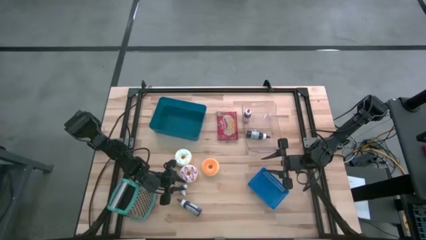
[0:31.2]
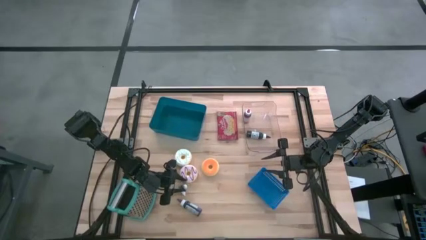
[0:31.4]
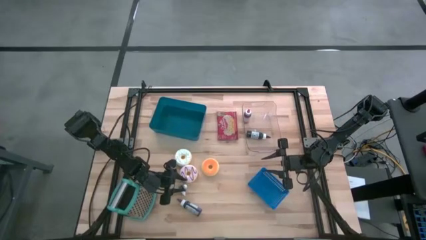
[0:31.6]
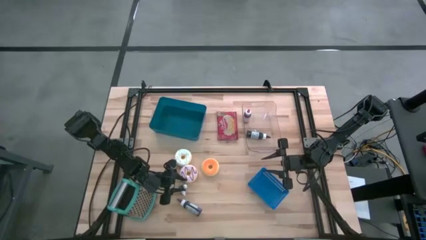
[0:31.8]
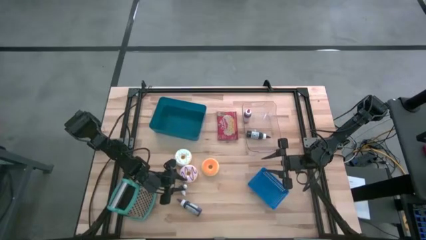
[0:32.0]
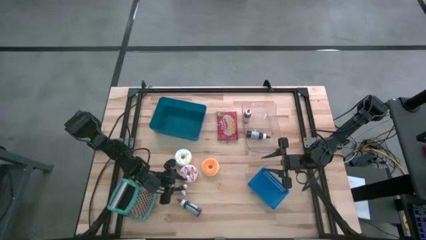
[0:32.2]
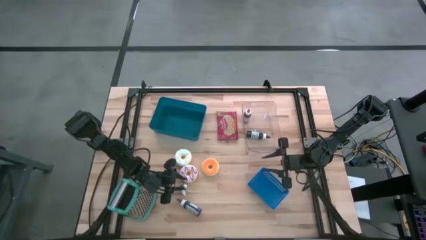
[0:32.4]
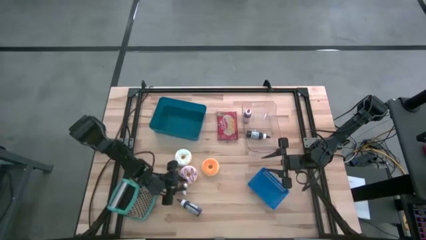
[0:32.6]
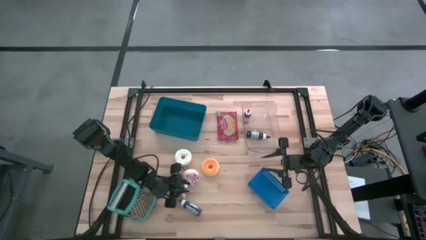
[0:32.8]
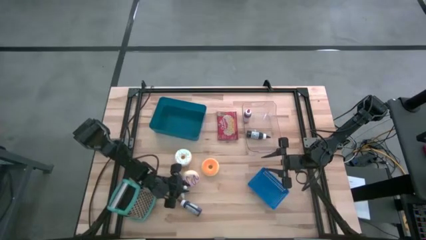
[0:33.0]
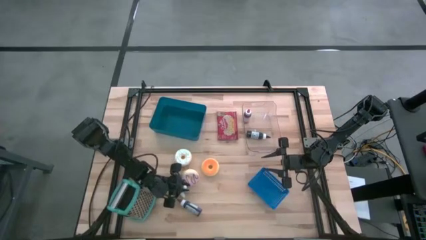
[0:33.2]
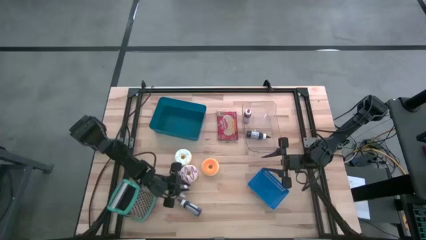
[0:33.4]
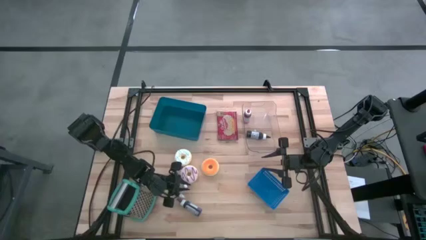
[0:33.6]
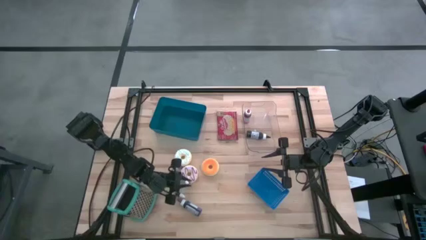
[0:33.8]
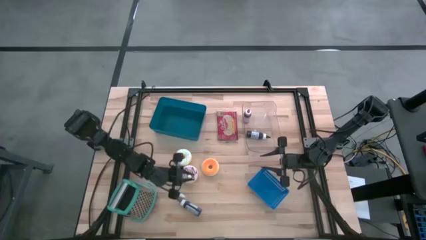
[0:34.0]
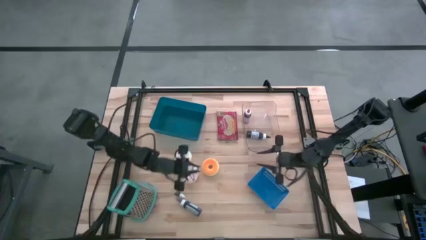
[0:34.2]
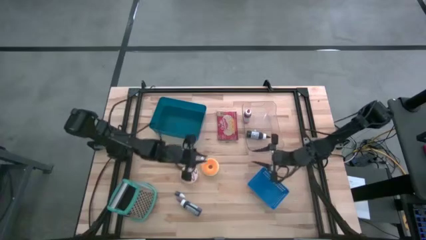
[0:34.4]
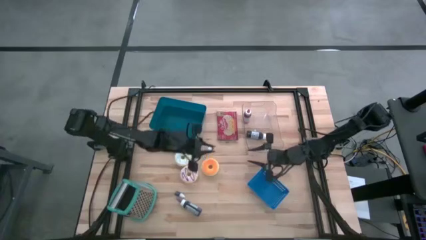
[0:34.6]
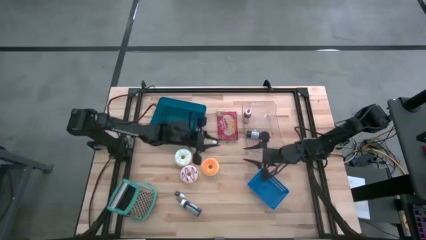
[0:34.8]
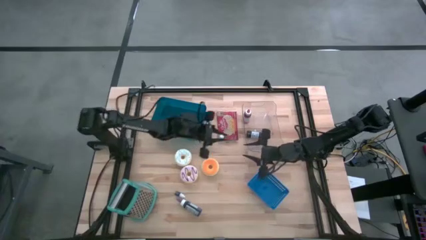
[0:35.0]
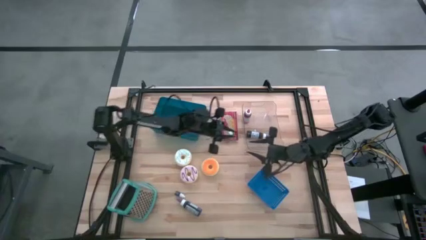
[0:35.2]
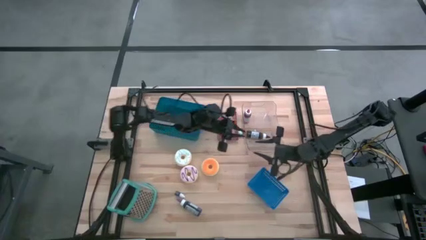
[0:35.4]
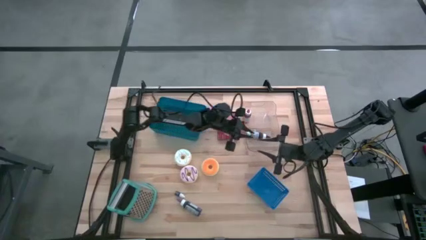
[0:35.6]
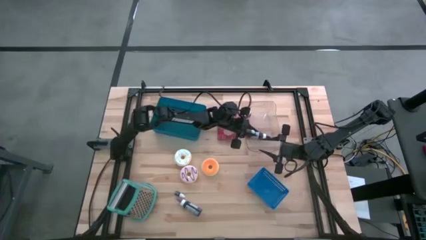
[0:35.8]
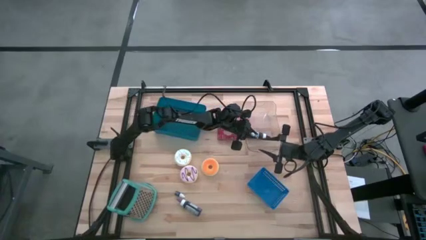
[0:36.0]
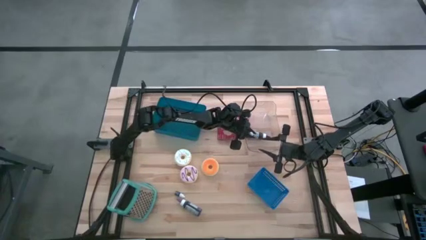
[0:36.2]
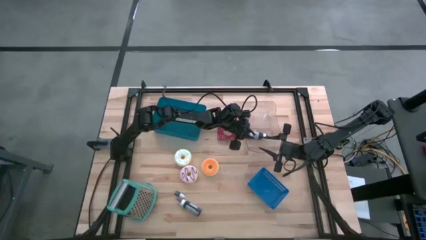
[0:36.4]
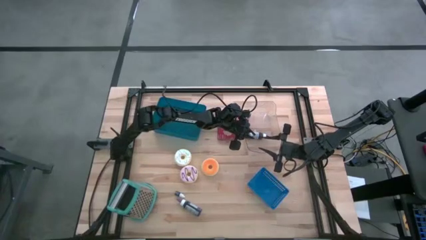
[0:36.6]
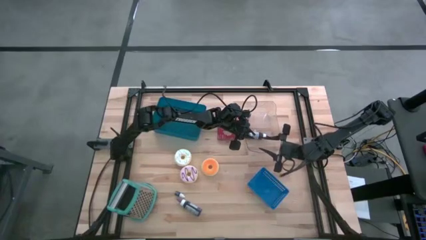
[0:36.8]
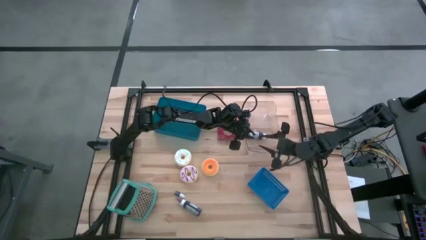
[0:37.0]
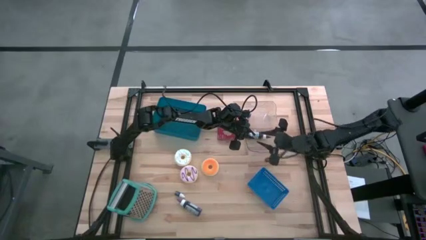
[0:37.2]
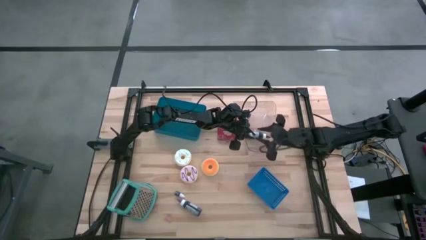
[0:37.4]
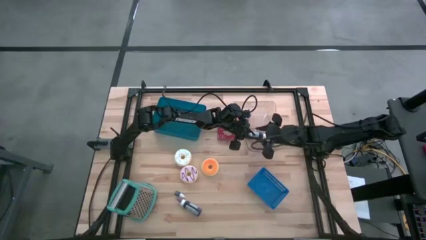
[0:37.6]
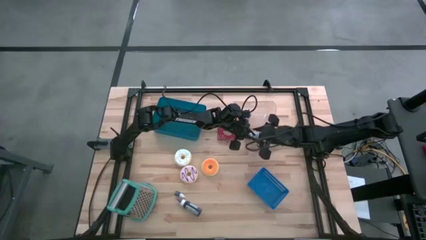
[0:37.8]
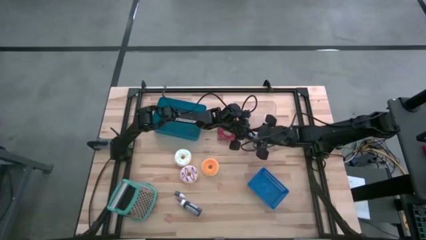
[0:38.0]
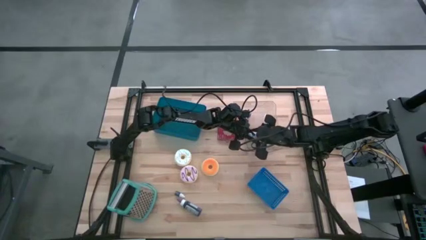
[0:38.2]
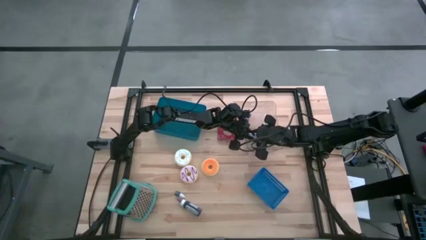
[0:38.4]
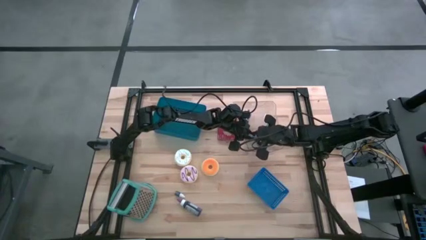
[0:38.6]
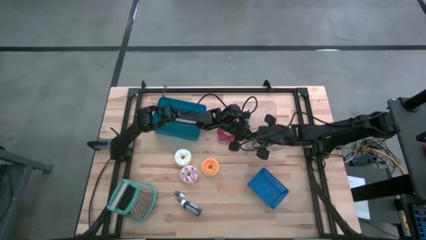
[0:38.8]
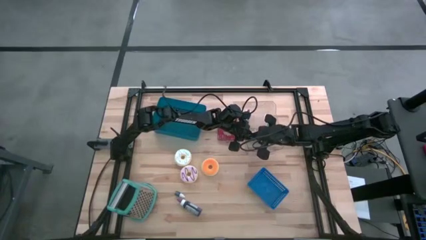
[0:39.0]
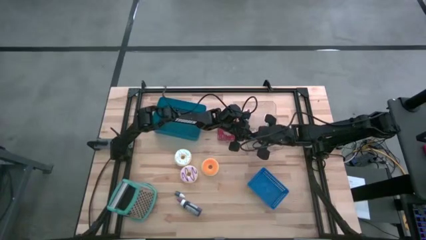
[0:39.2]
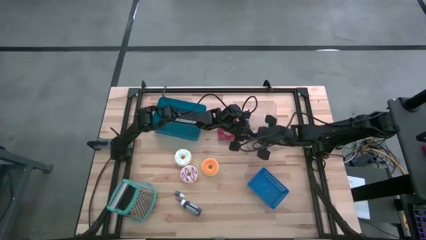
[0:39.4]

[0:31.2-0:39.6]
Task: Pick & Place Food Item
Put the top small purple food coloring bottle into the transparent bin

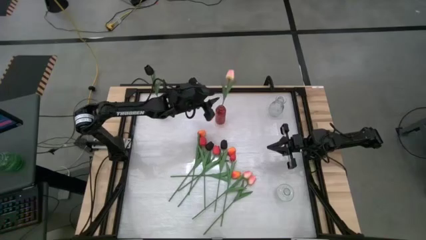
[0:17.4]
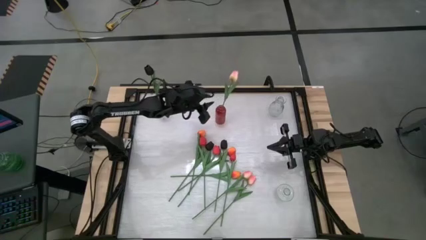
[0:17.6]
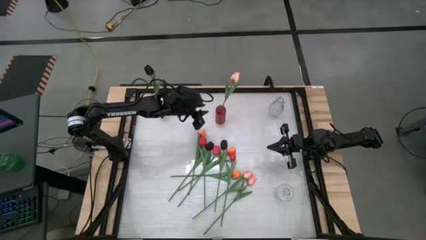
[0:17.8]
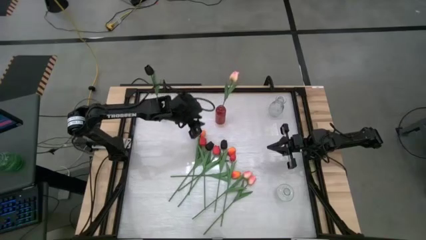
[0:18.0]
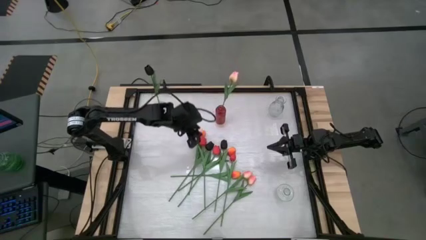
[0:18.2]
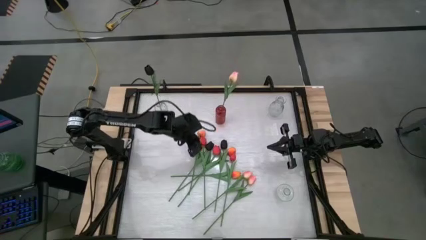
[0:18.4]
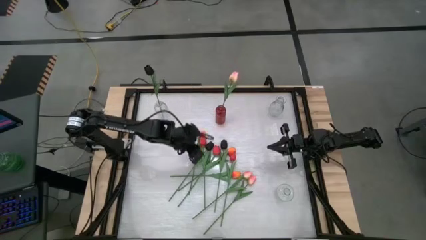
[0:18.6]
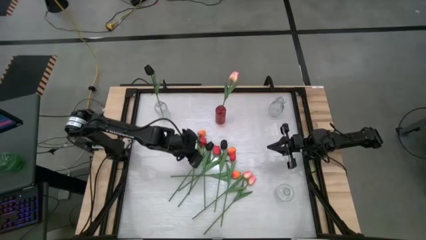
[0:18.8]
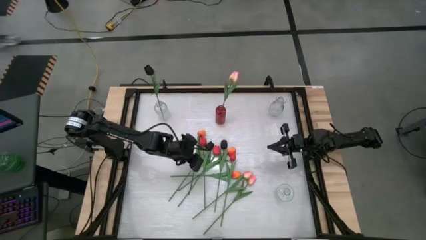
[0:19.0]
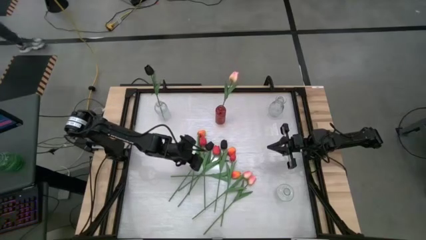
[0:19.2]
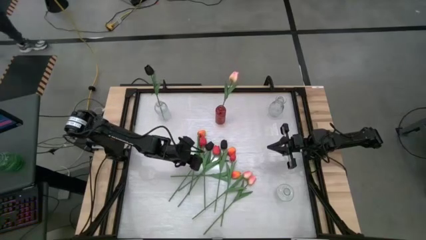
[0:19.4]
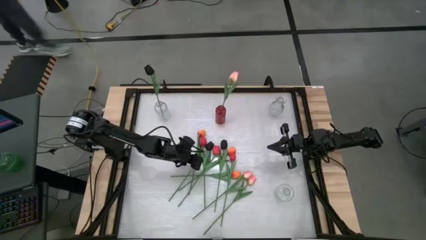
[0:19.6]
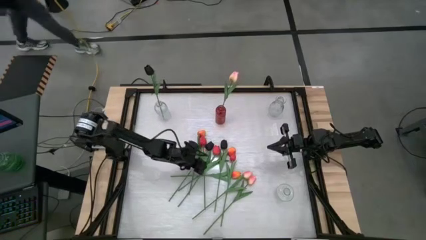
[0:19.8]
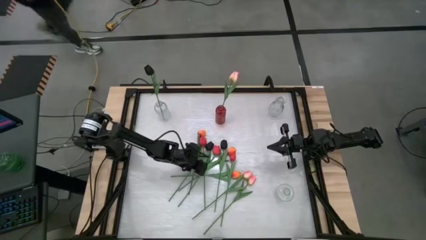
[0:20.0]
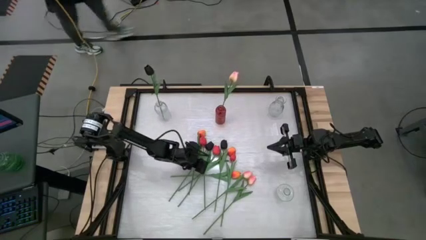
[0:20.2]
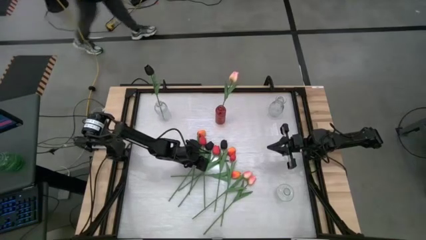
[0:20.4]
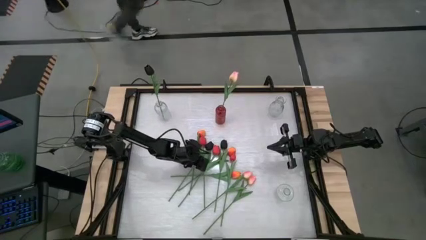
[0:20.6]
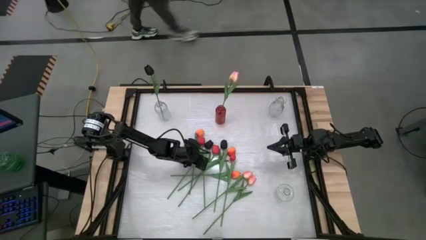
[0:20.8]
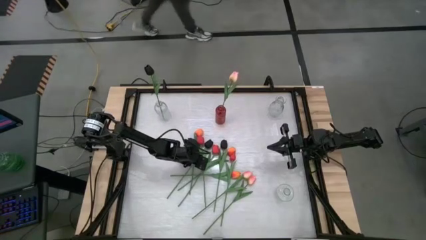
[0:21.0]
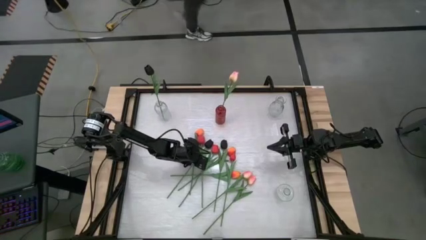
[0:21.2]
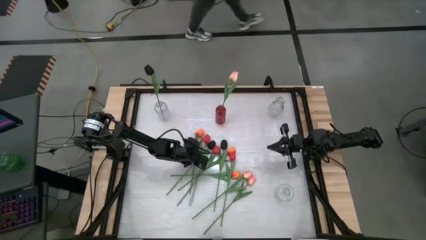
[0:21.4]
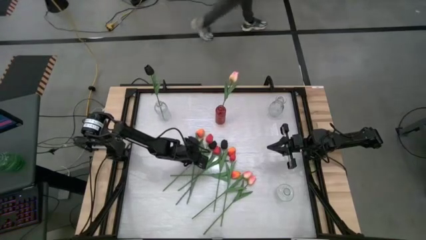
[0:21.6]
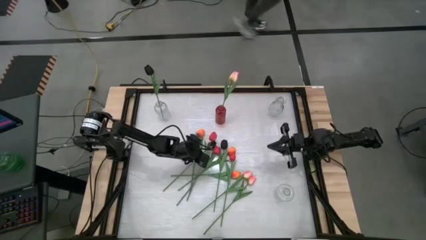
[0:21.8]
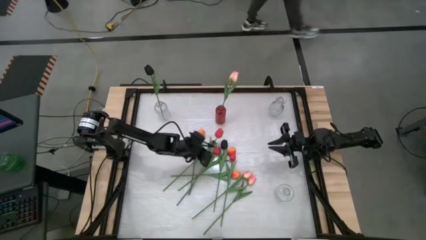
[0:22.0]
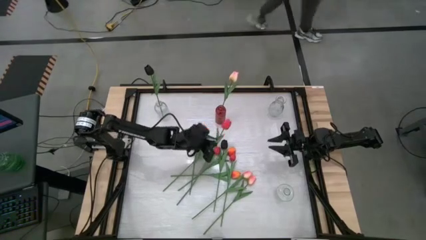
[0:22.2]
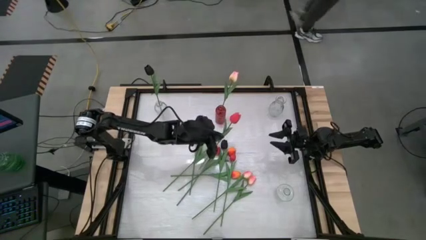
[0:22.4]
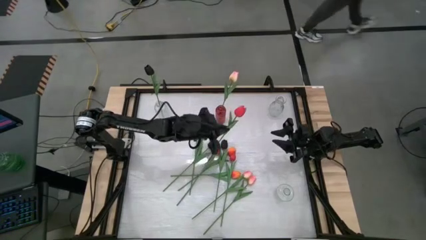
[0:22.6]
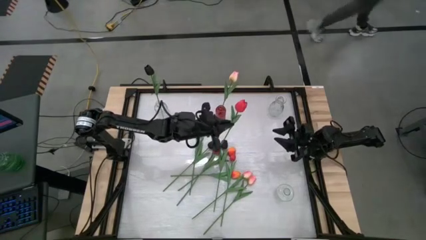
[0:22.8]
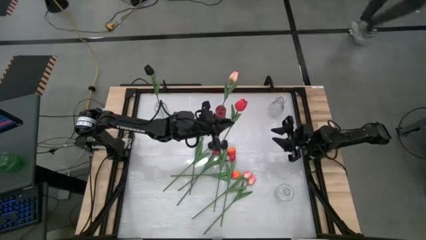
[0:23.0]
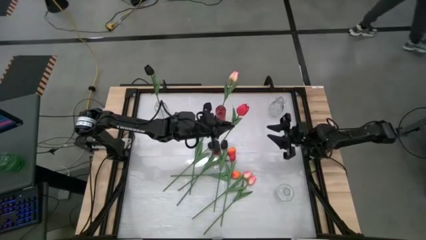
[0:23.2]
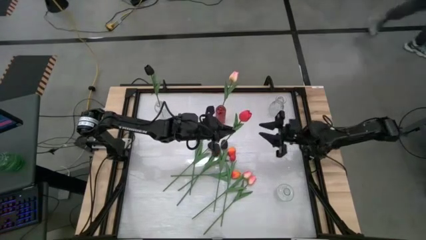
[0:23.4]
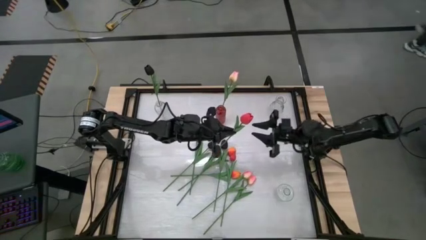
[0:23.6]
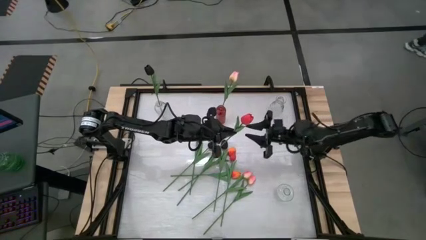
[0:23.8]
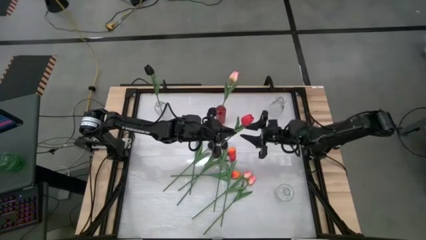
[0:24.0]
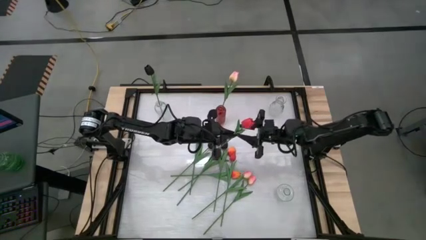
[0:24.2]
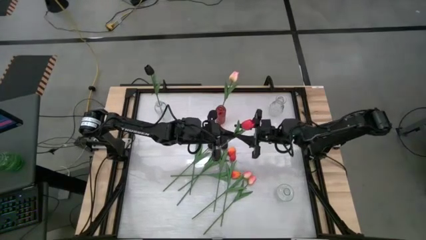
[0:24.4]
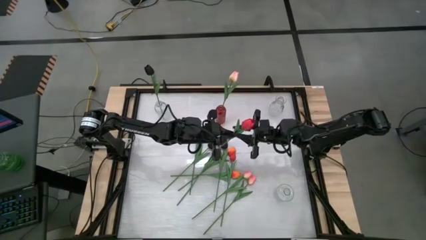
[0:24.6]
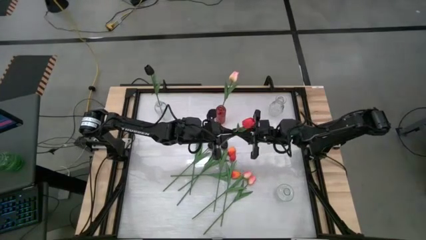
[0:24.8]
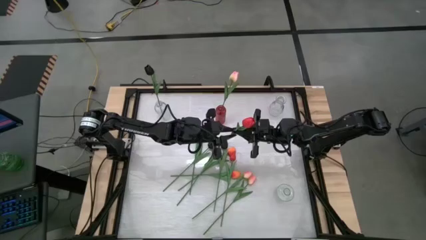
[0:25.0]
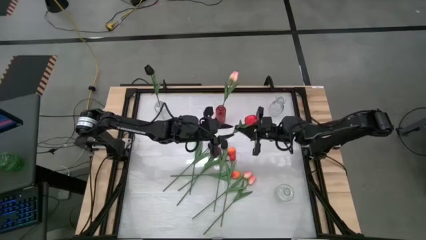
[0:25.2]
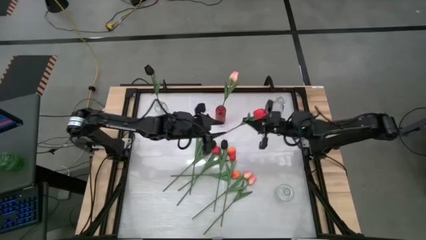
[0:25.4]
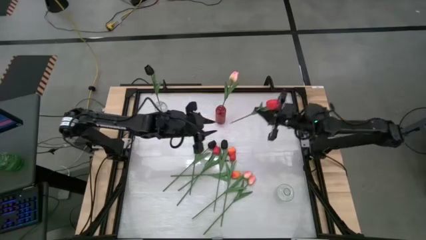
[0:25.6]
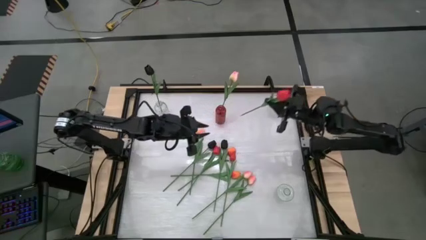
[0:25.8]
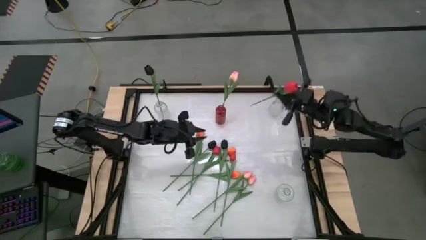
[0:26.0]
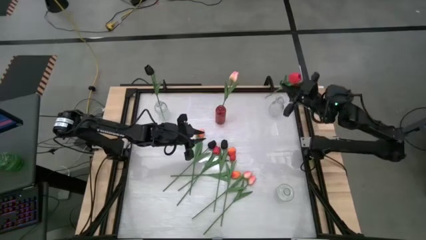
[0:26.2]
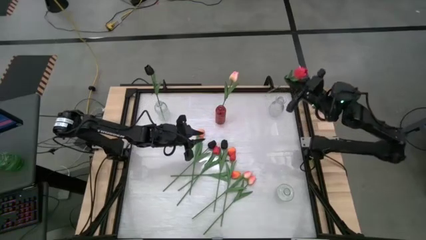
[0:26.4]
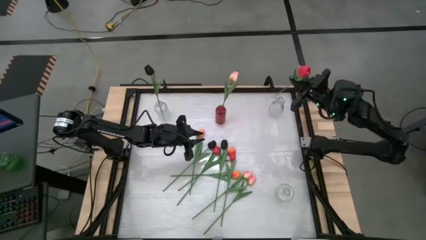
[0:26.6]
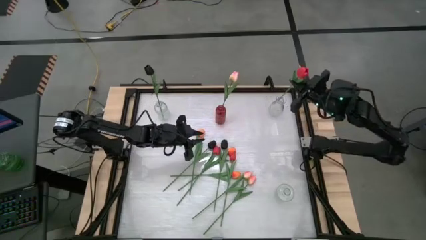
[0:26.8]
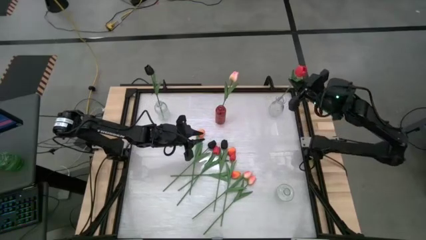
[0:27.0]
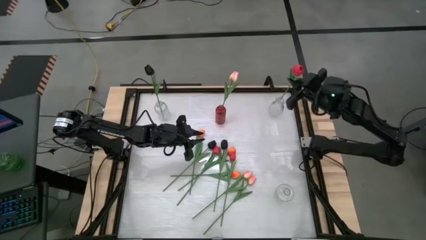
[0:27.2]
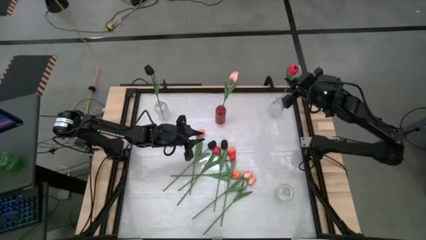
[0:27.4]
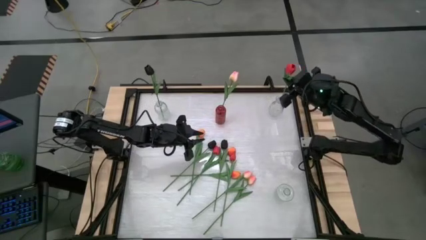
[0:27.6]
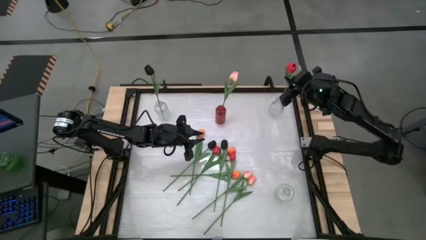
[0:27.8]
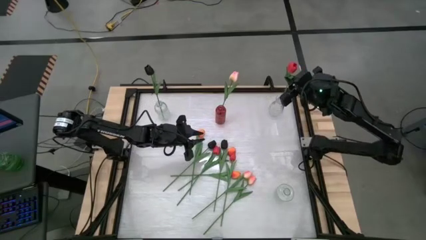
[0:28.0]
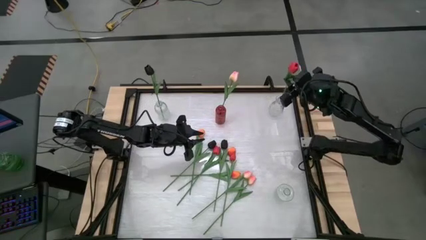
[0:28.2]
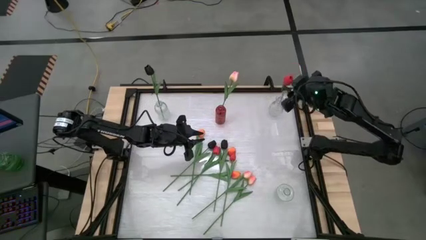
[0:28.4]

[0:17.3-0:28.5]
Task: Sort flowers into vase by color
Put the top red flower into the top right transparent vase
